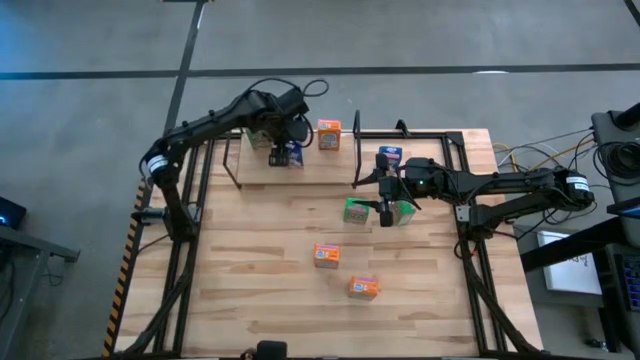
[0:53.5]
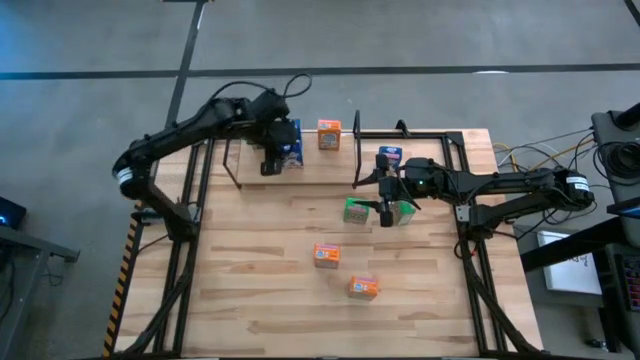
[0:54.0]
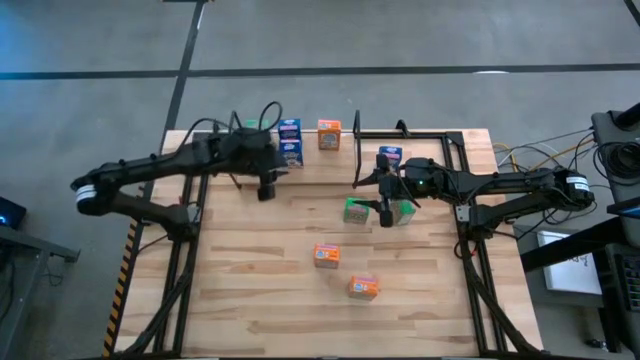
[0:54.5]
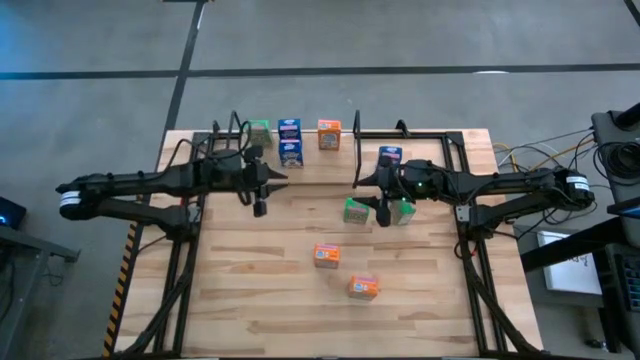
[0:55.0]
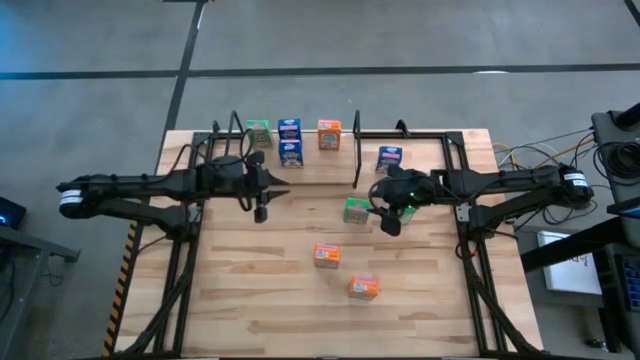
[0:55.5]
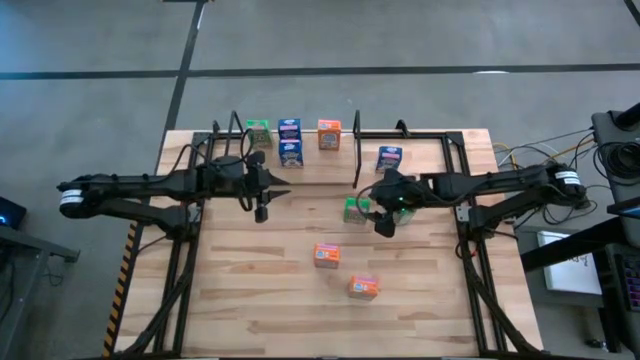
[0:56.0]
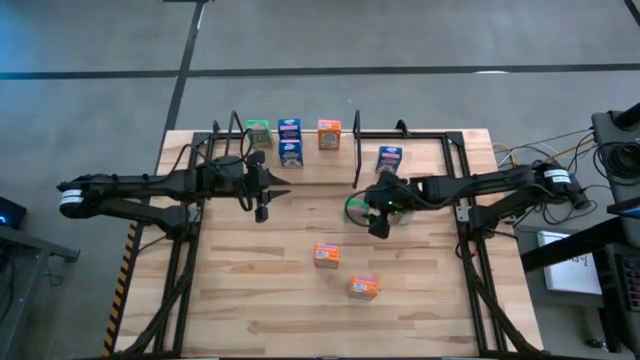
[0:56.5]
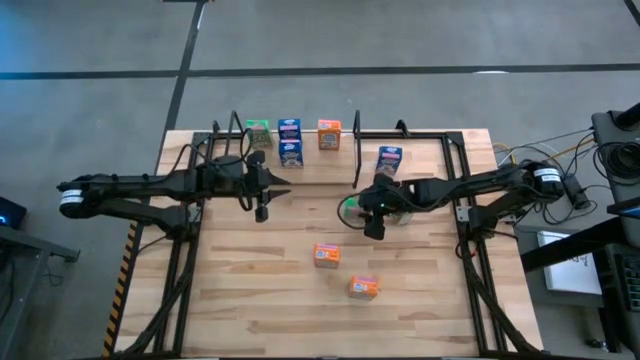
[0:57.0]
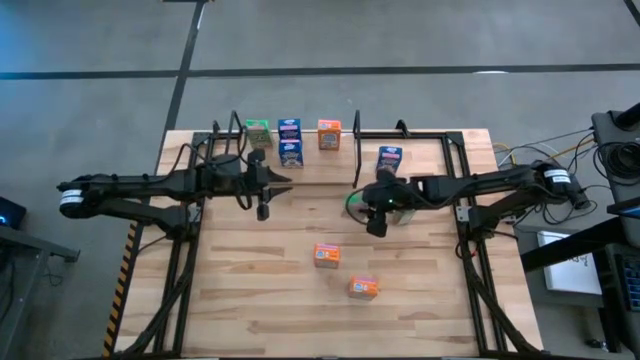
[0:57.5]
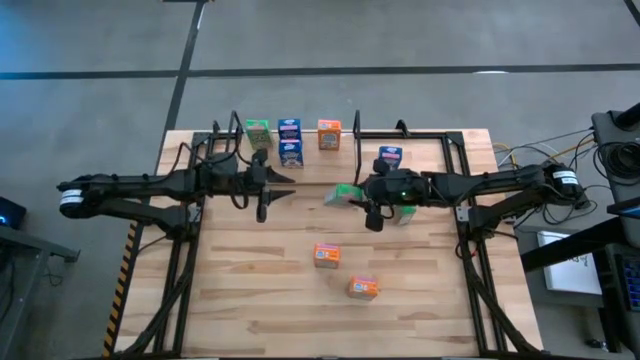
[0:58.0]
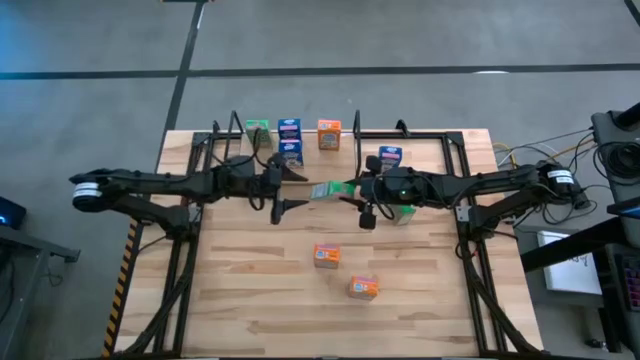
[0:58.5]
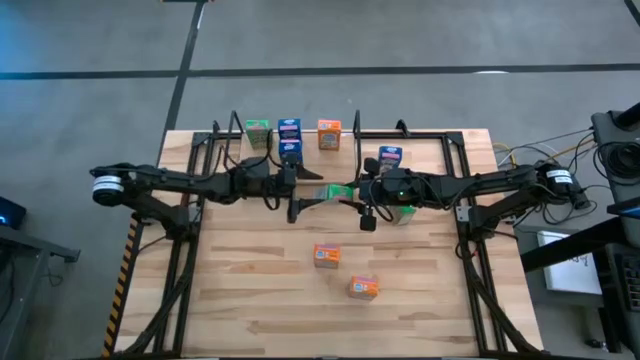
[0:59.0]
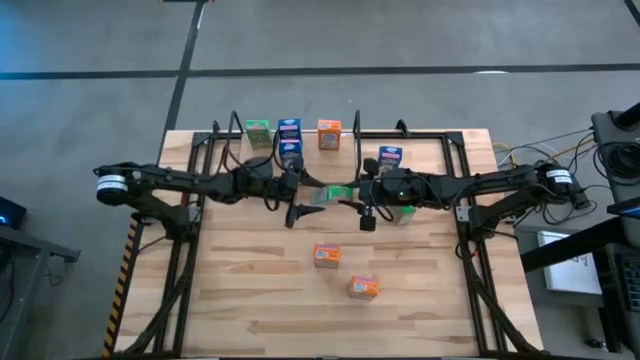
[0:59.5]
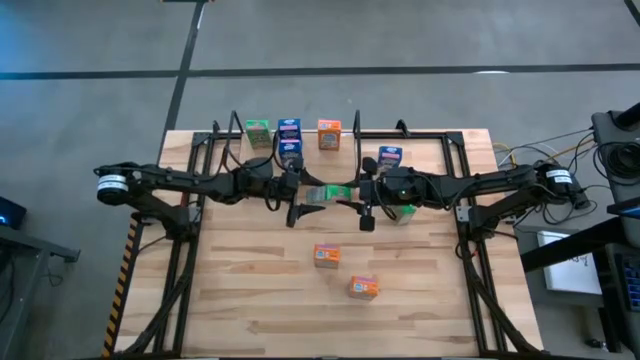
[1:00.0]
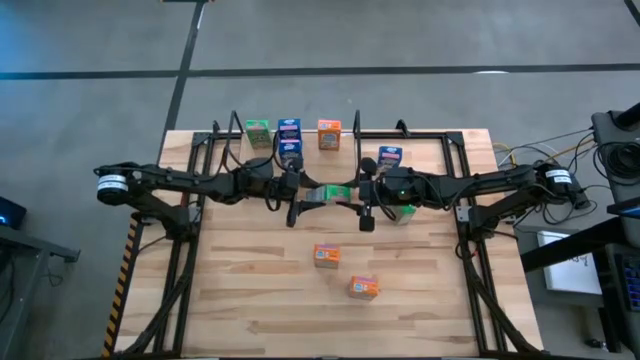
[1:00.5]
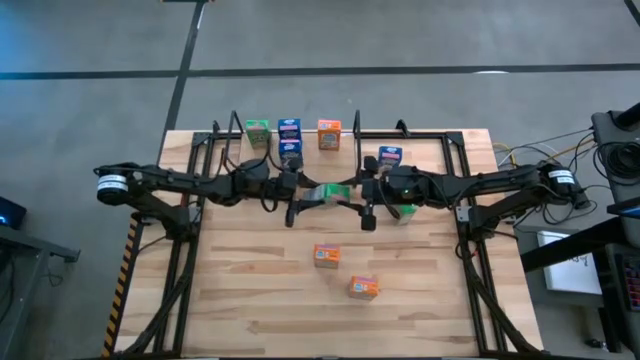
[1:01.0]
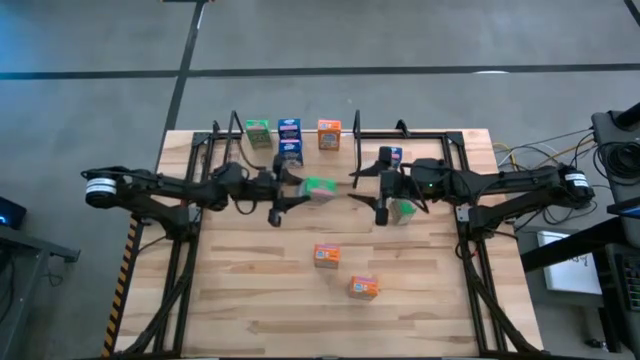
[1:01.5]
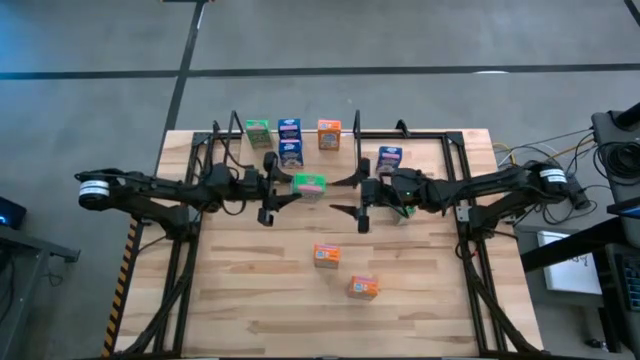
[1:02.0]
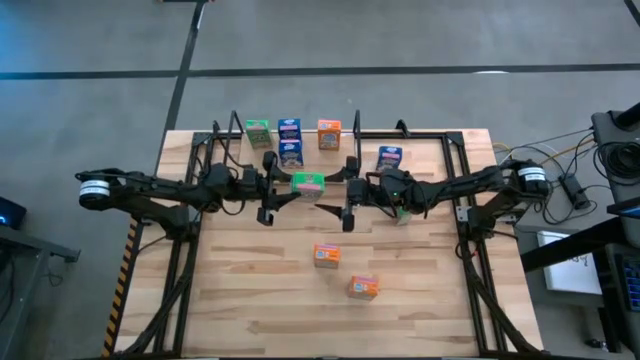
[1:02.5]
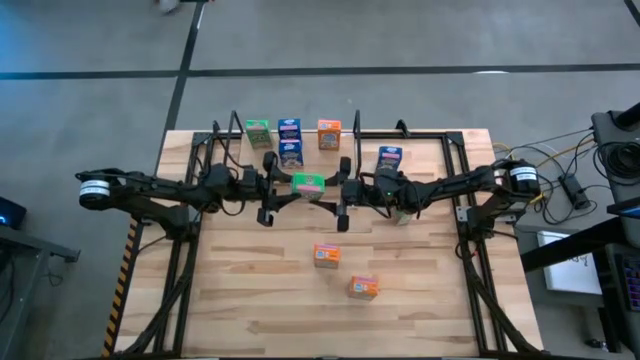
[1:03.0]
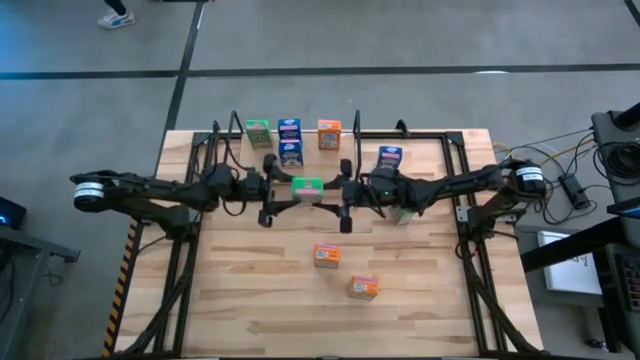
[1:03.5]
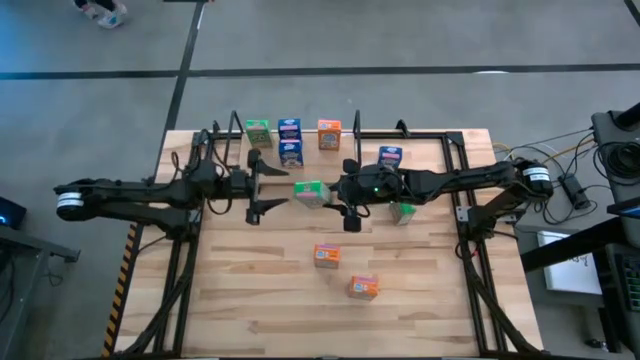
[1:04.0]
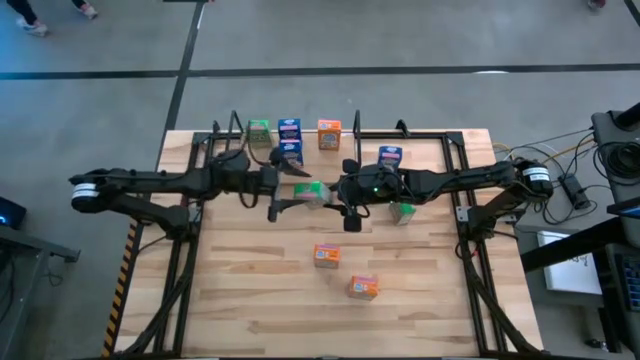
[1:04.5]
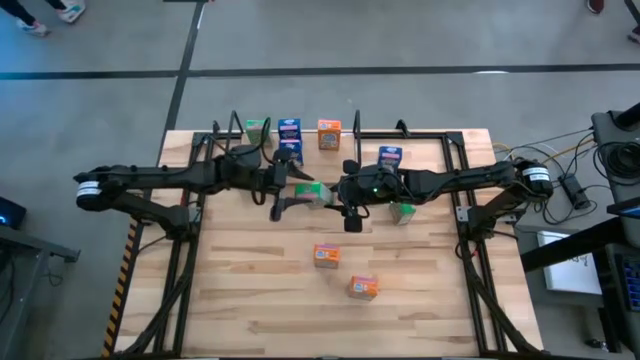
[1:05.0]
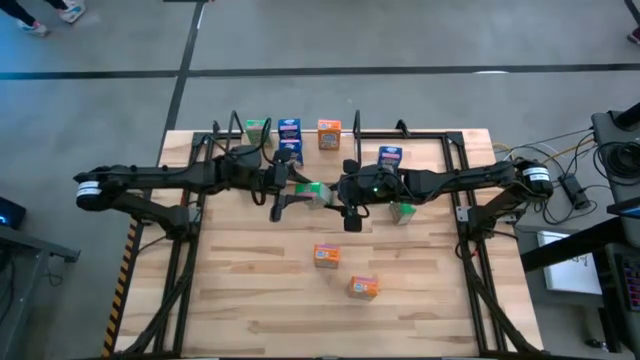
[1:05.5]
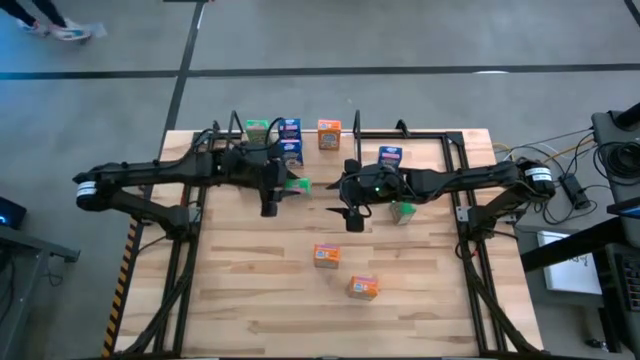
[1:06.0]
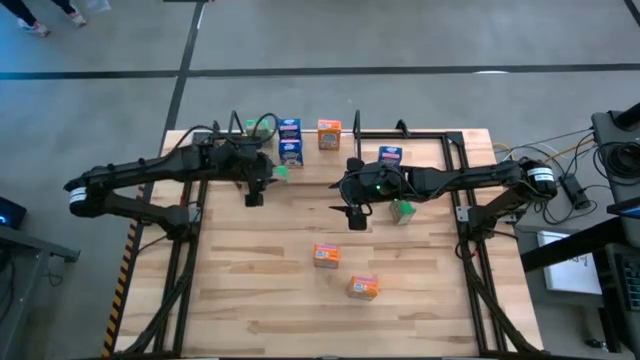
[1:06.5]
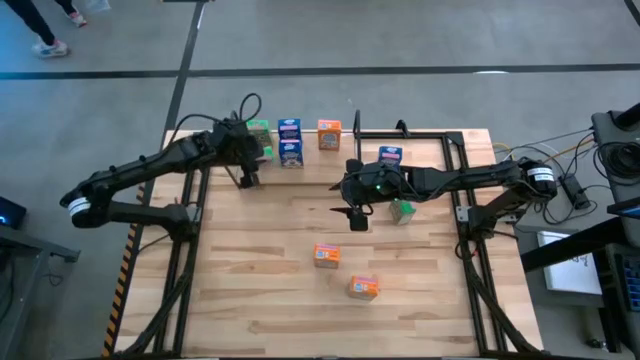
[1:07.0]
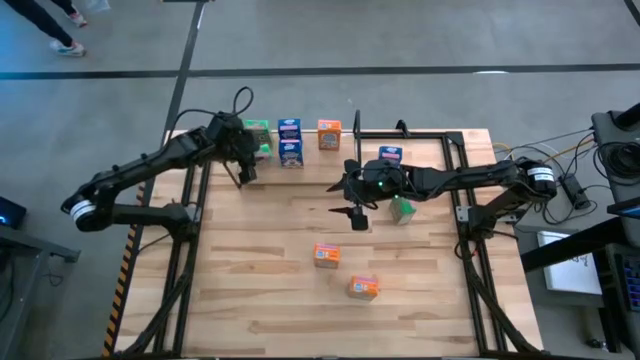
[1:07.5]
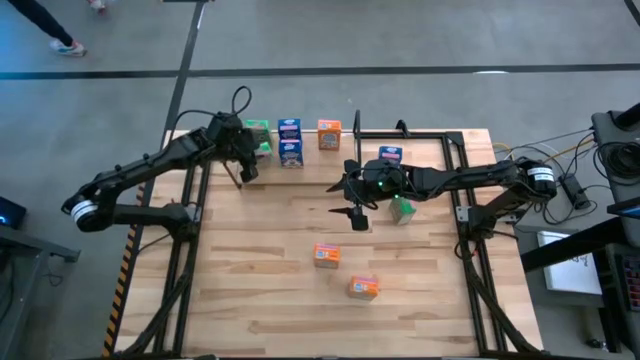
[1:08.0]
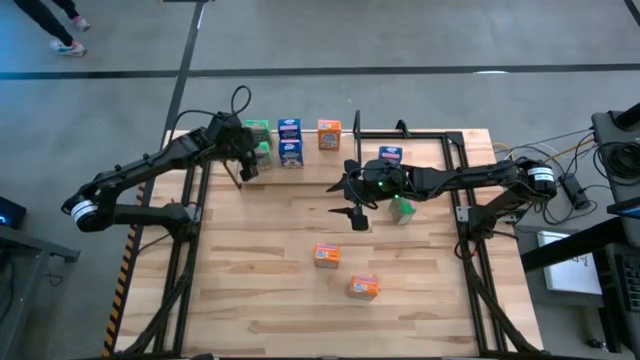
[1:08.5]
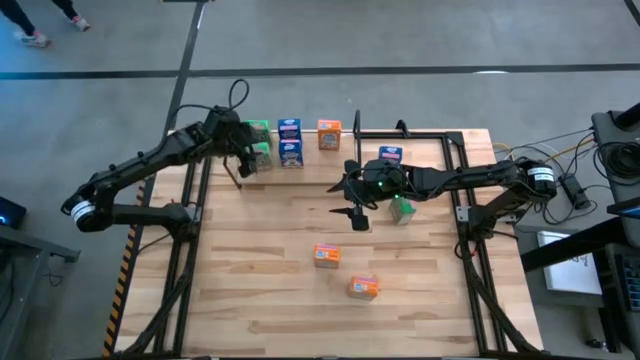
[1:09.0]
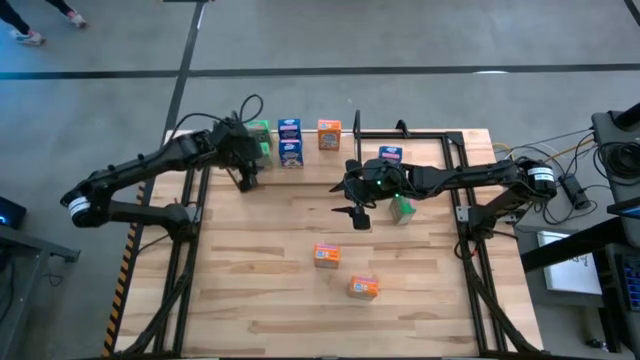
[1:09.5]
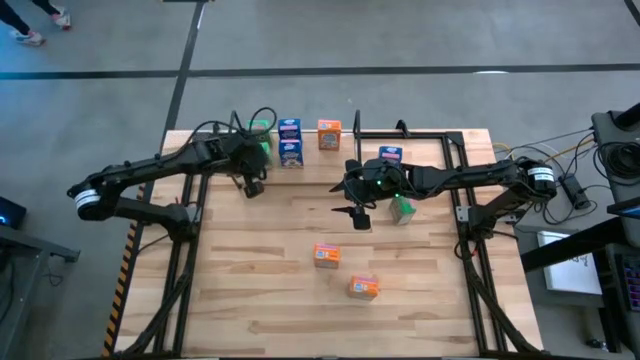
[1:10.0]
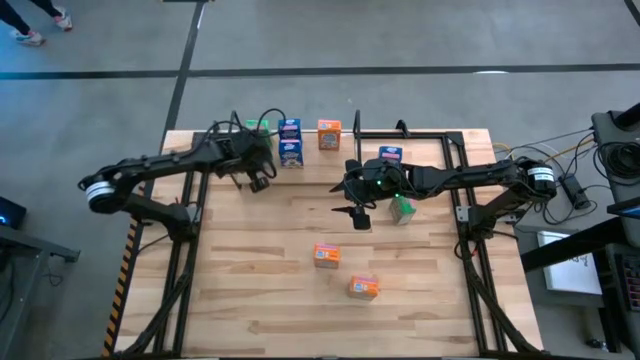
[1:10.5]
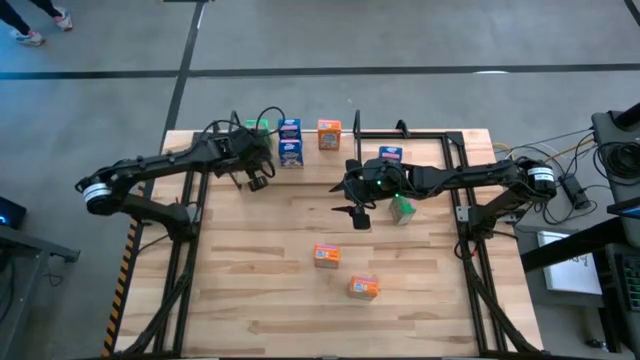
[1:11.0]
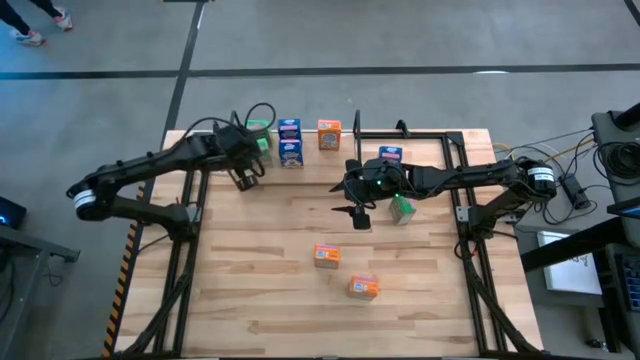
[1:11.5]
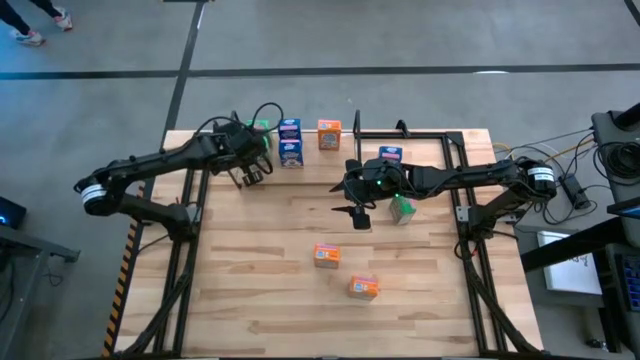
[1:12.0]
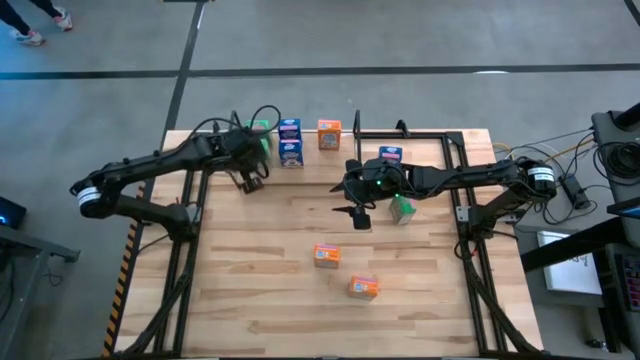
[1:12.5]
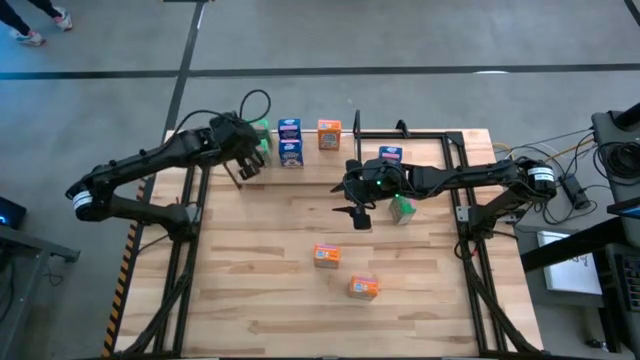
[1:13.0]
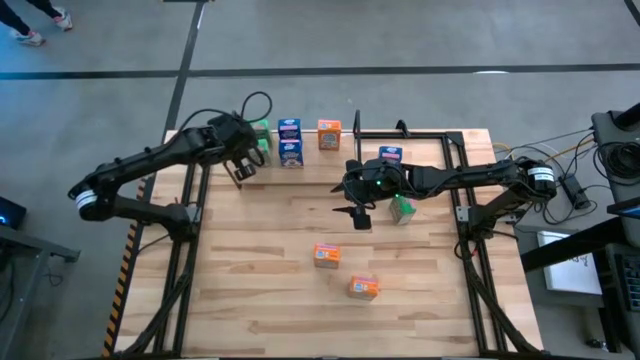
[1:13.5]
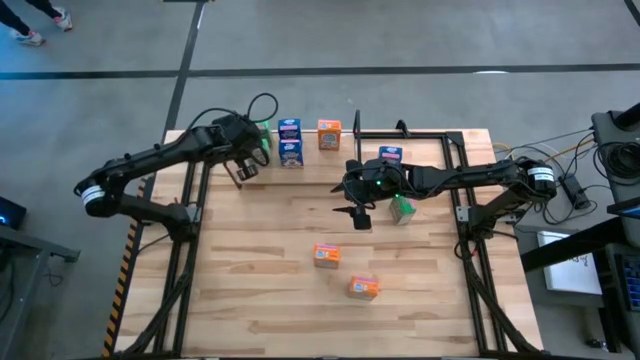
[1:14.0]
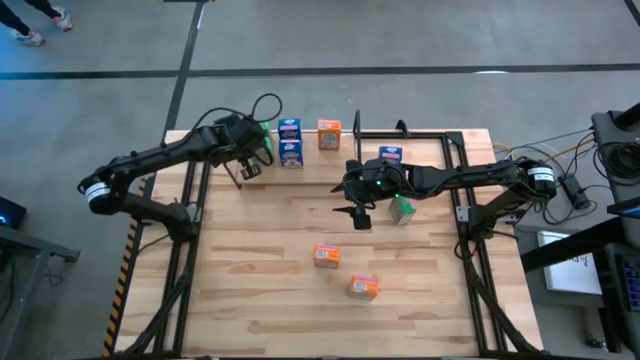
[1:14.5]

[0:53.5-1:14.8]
Task: Stack cereal on shelf
Put the left green cereal box on the shelf aligned with the other green cereal box

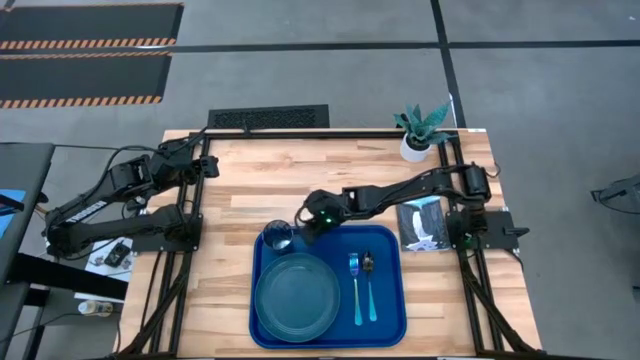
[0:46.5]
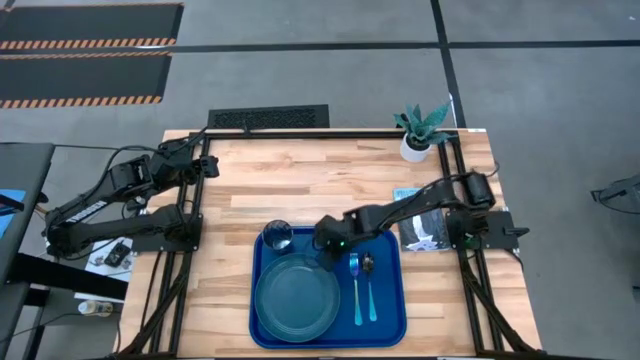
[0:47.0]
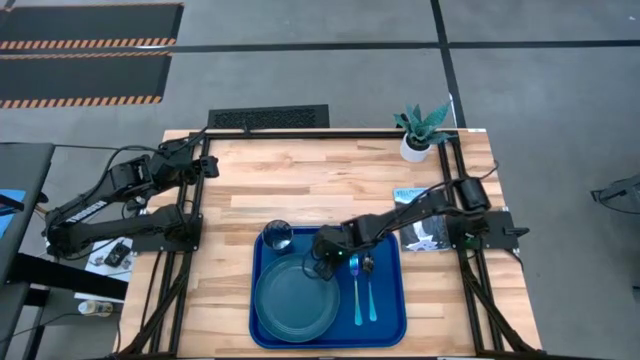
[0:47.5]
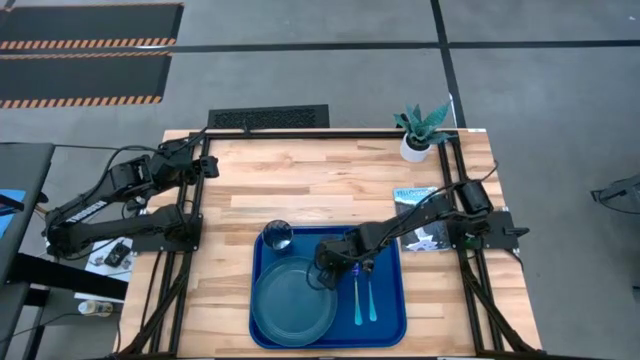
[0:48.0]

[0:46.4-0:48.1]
Task: Pick and place plate/cup/fork/spoon on tray
Adjust the blue plate
